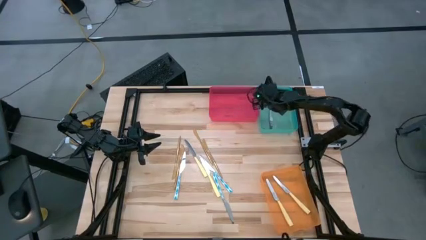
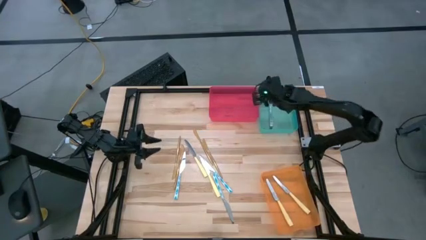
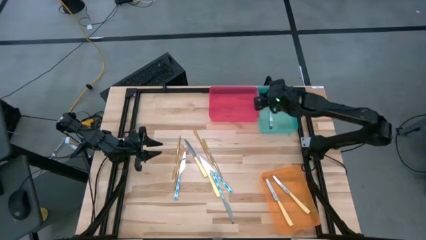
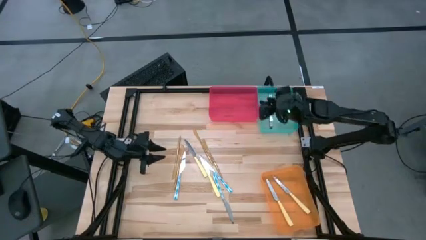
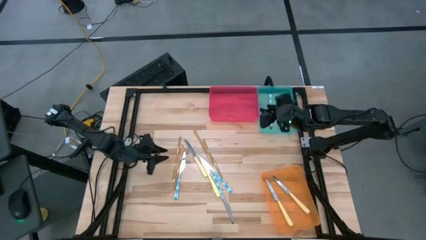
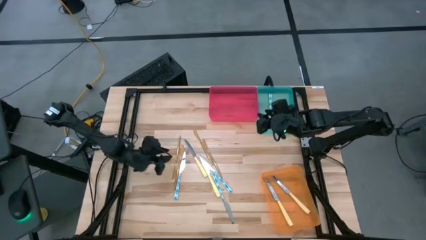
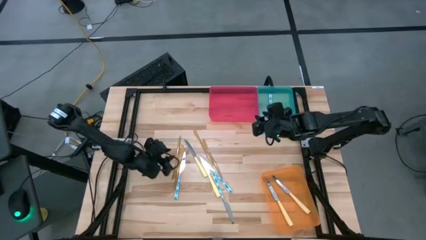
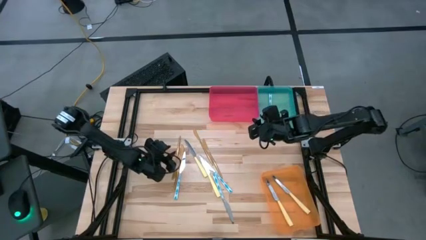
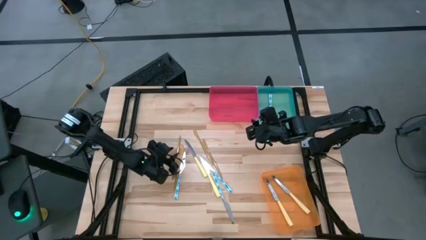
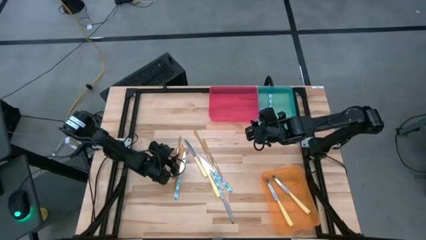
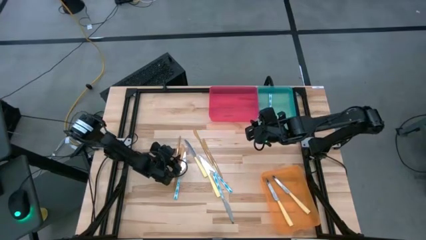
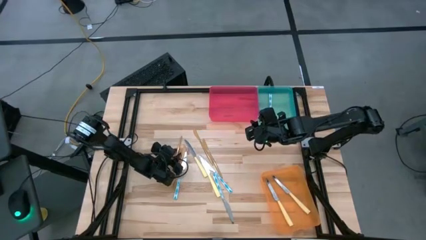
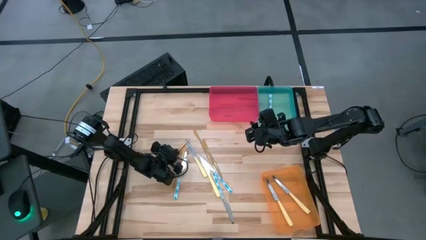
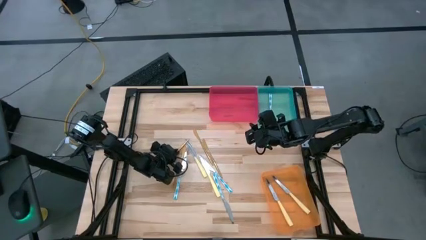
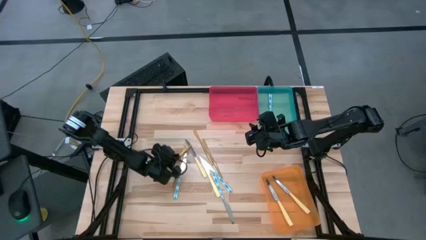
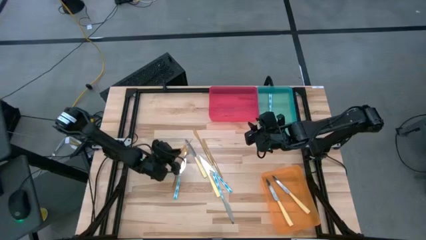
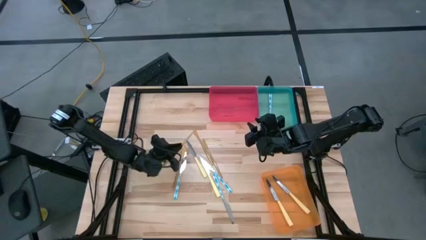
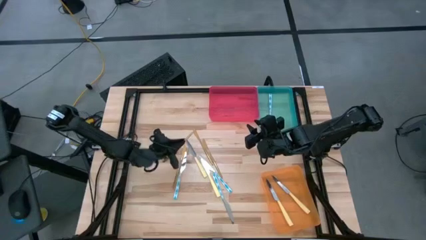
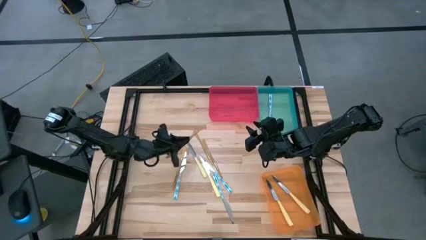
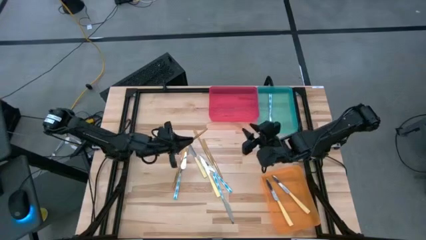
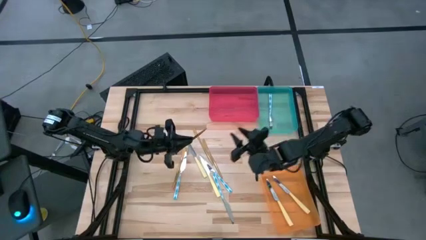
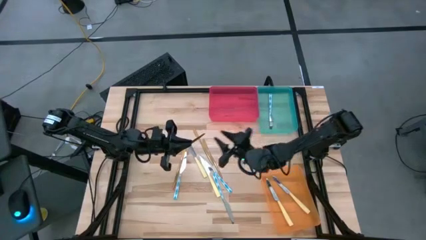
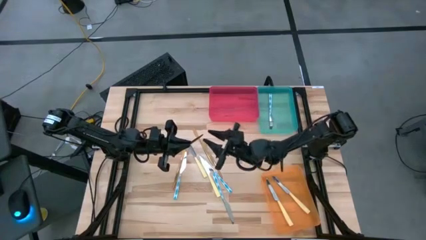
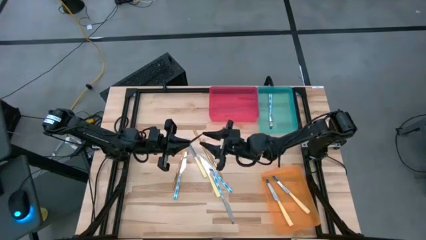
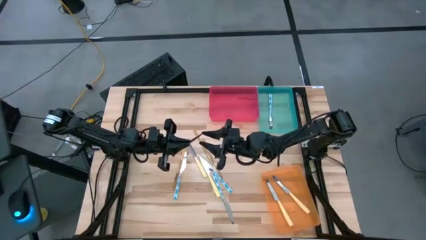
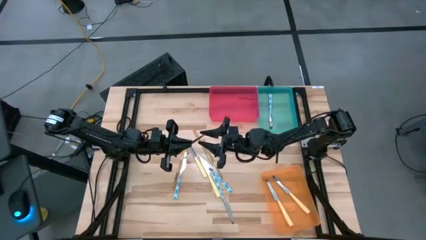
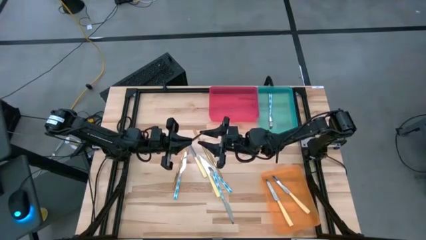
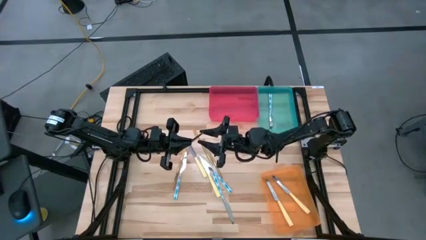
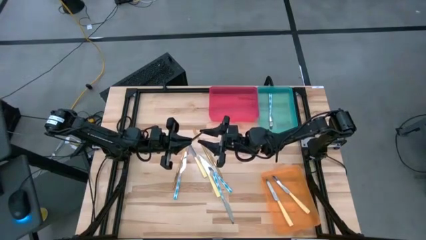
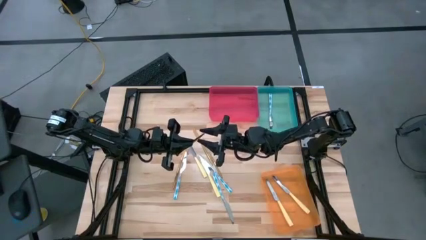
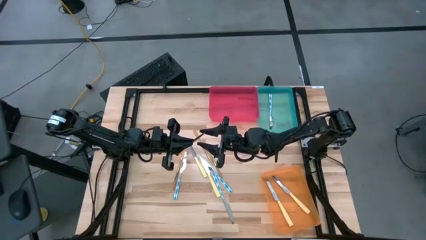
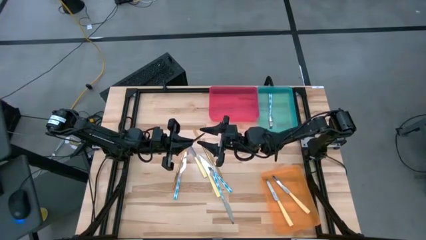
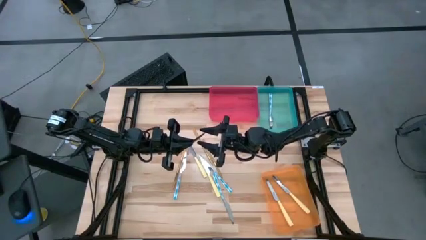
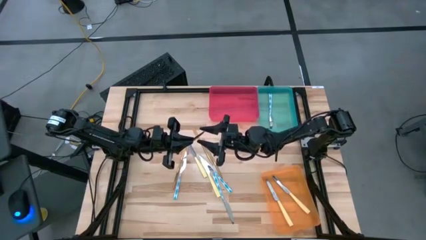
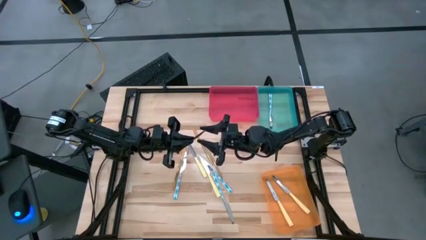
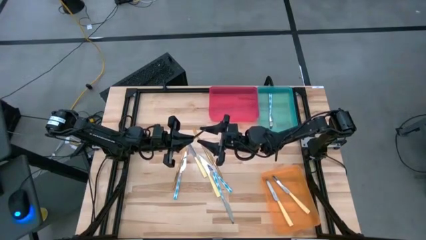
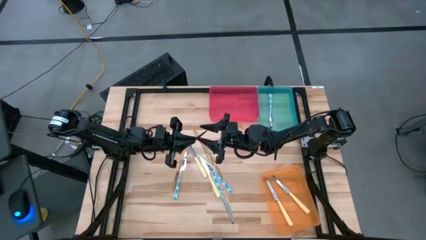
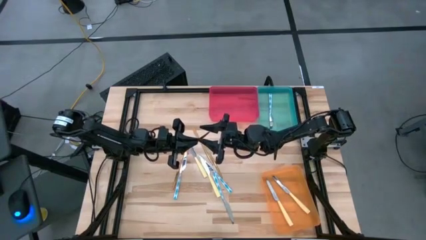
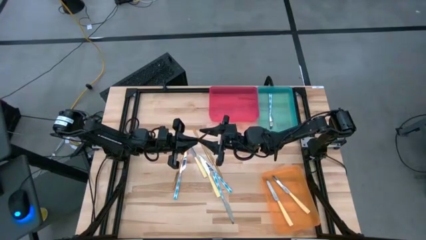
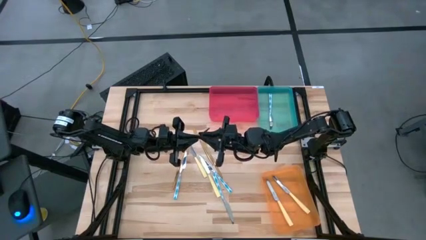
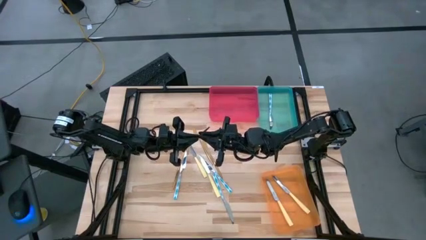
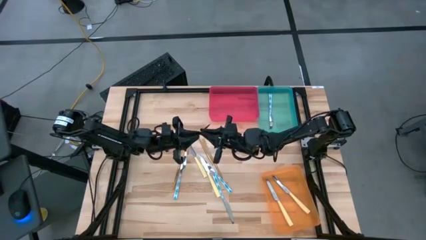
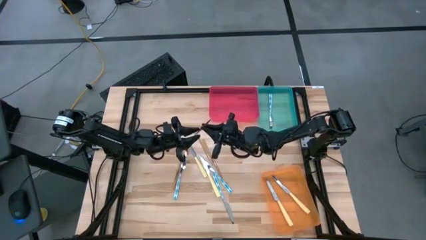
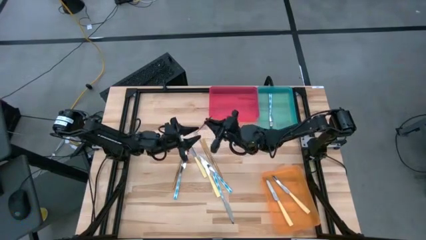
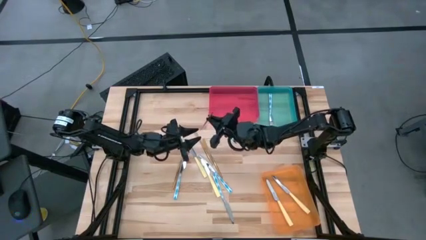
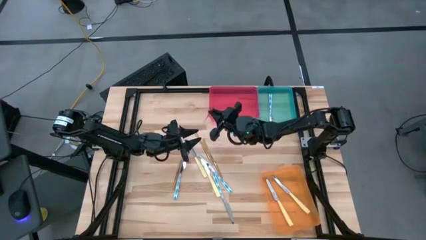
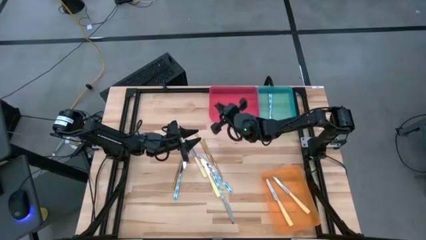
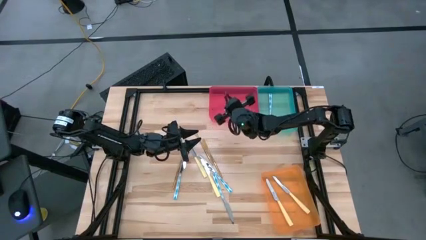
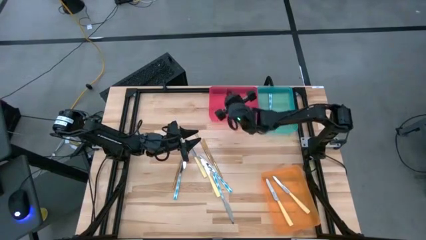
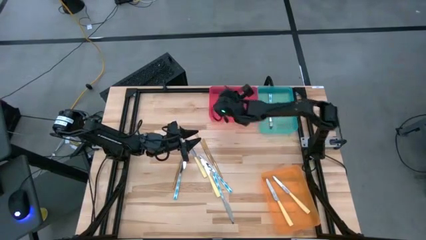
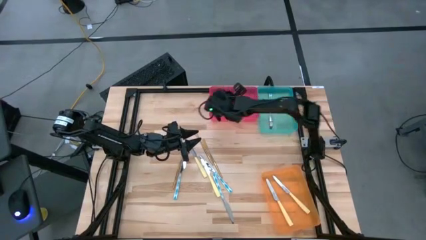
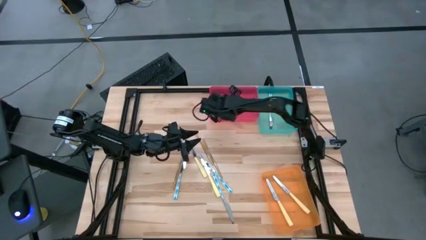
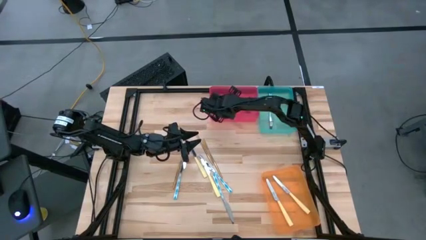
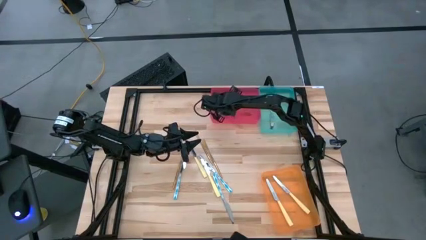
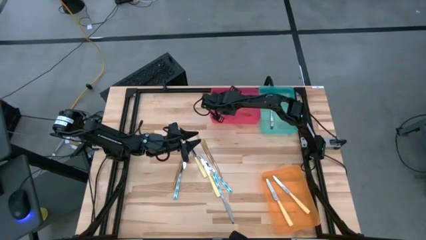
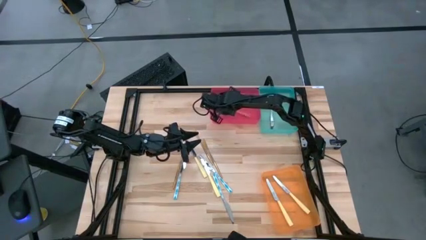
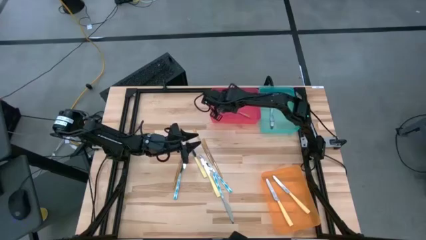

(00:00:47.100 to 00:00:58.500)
Task: Sort silverware by color (type)
Put the golden knife into the red bin bin
